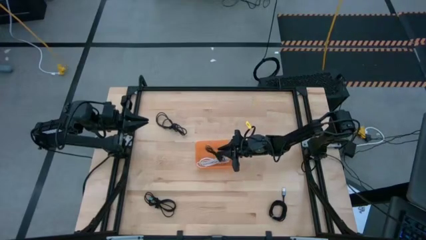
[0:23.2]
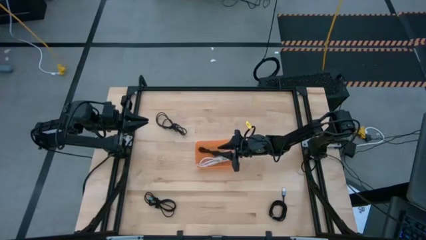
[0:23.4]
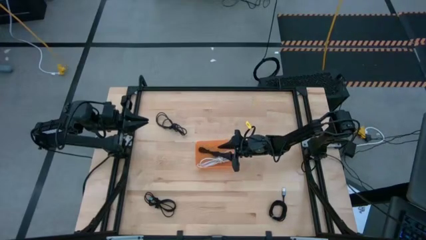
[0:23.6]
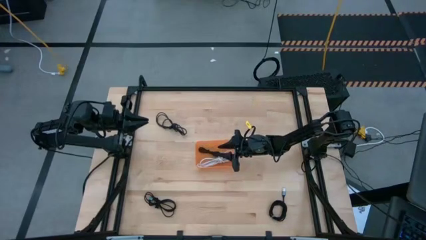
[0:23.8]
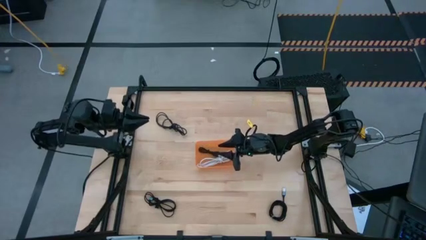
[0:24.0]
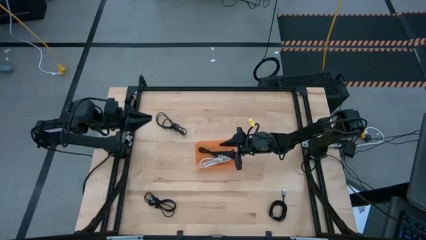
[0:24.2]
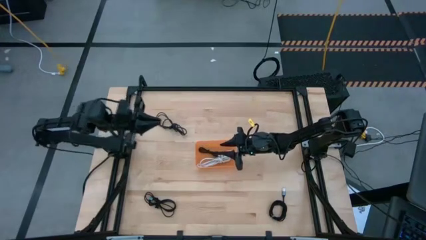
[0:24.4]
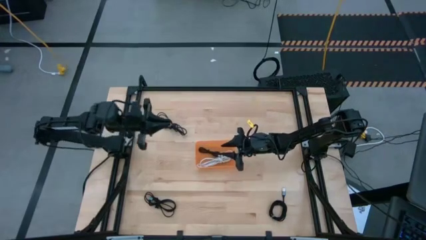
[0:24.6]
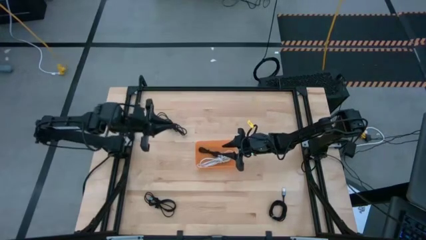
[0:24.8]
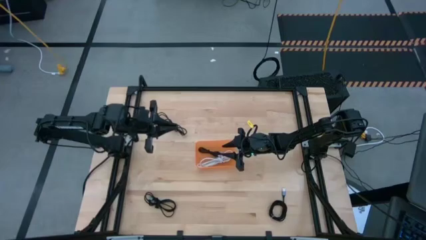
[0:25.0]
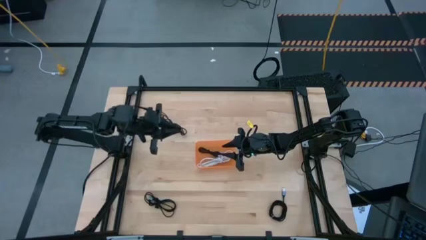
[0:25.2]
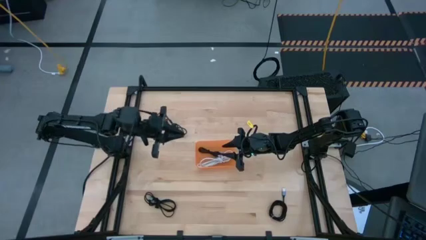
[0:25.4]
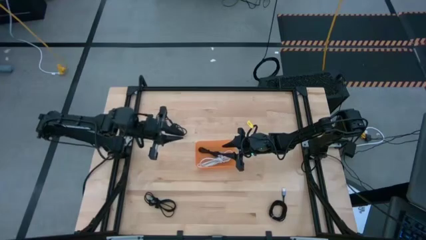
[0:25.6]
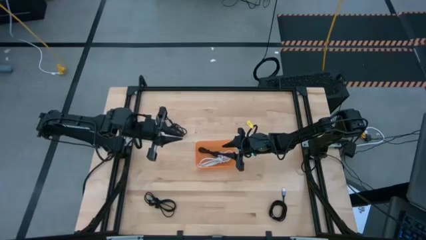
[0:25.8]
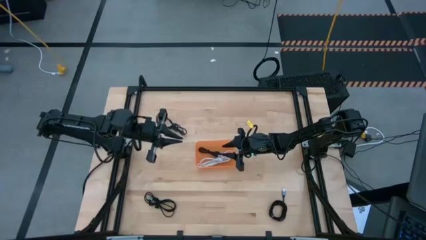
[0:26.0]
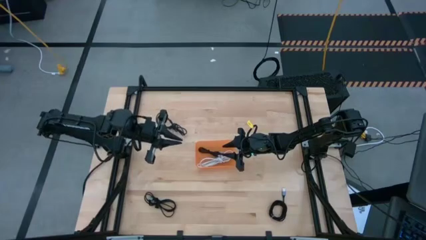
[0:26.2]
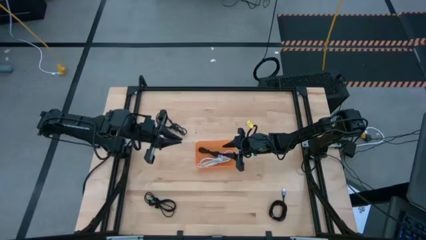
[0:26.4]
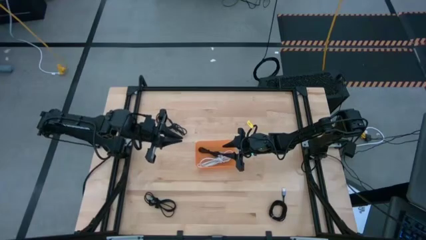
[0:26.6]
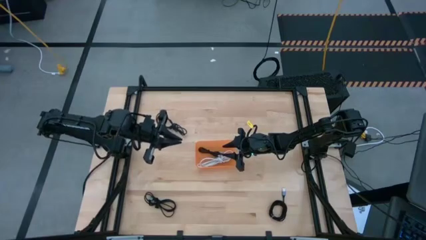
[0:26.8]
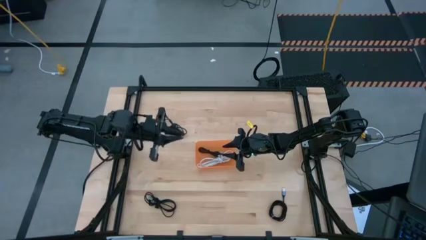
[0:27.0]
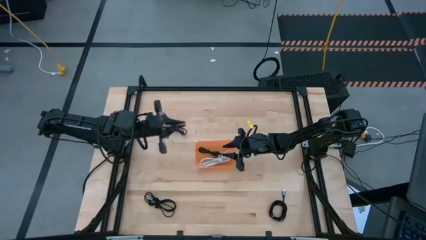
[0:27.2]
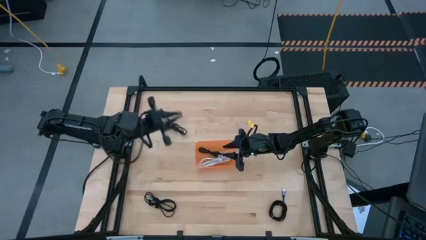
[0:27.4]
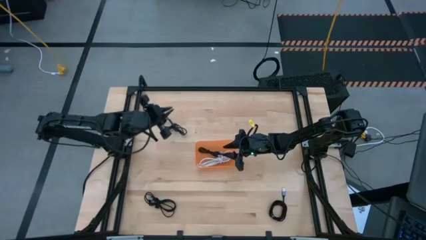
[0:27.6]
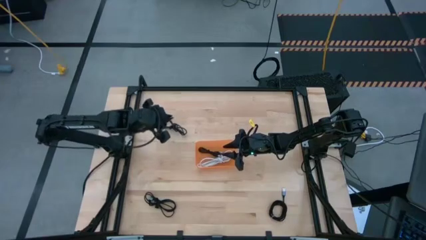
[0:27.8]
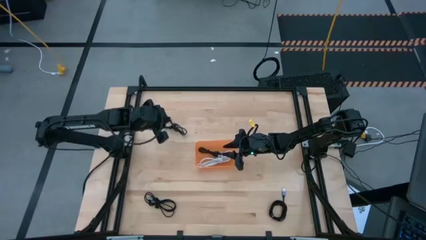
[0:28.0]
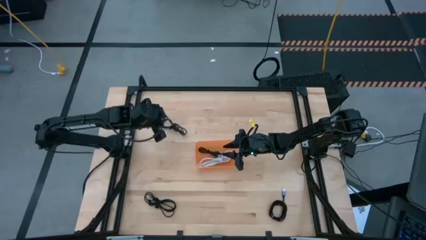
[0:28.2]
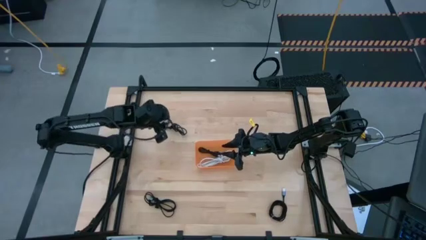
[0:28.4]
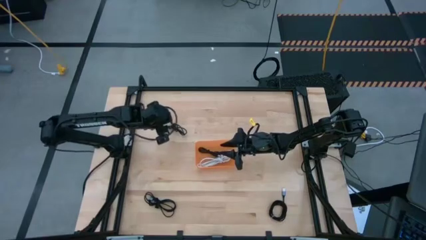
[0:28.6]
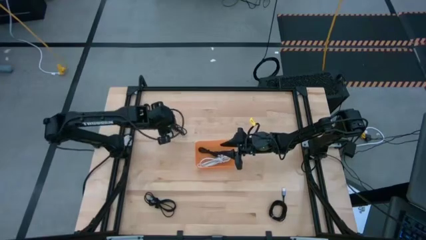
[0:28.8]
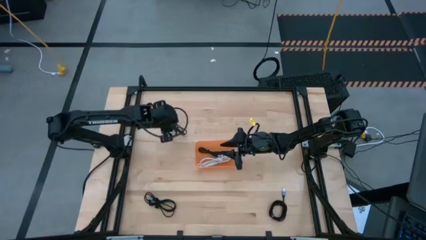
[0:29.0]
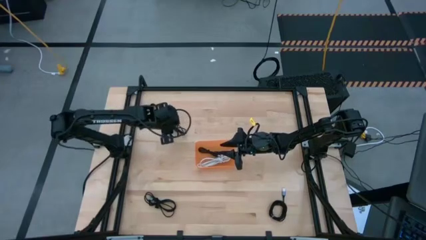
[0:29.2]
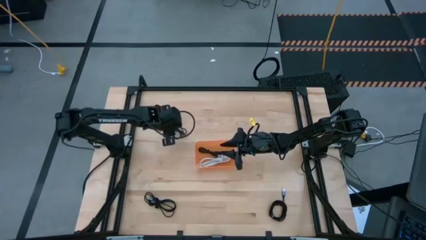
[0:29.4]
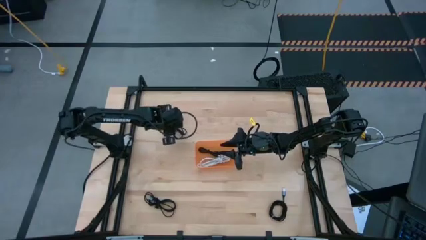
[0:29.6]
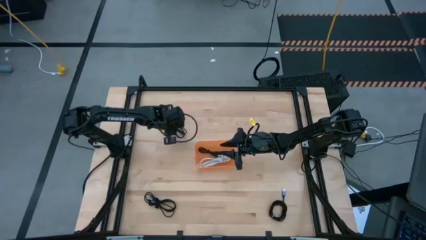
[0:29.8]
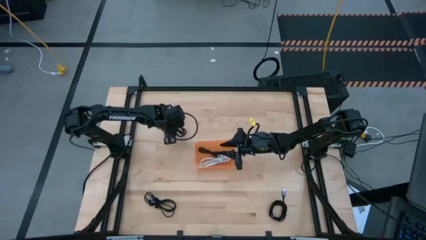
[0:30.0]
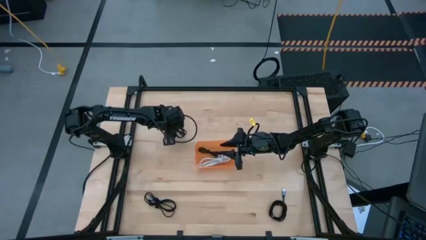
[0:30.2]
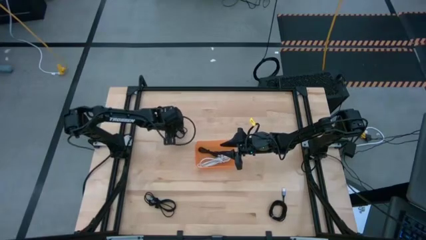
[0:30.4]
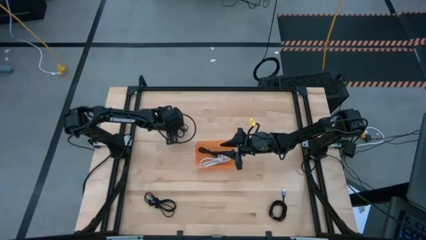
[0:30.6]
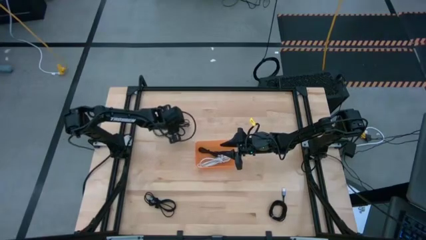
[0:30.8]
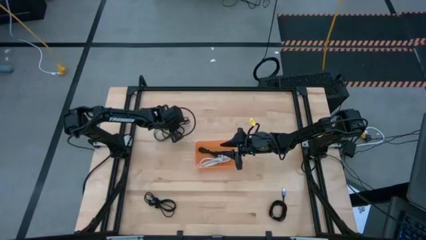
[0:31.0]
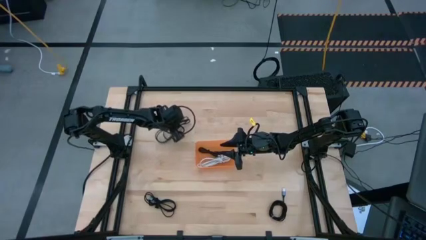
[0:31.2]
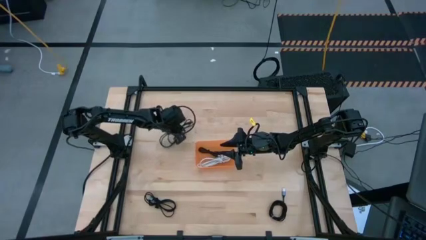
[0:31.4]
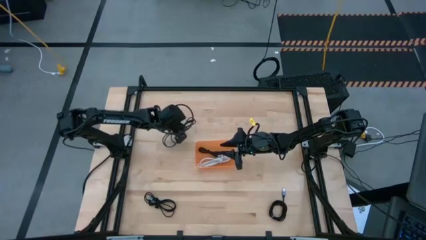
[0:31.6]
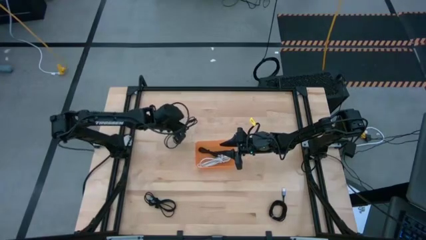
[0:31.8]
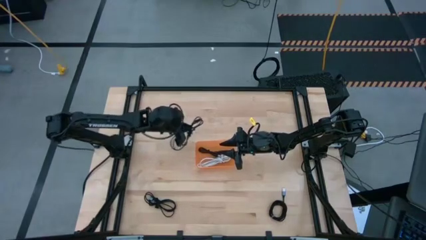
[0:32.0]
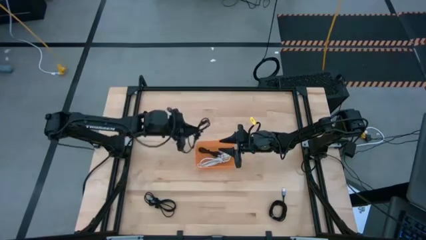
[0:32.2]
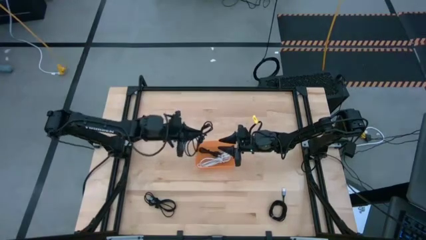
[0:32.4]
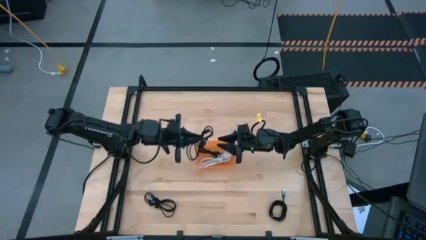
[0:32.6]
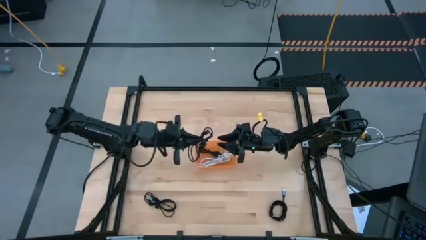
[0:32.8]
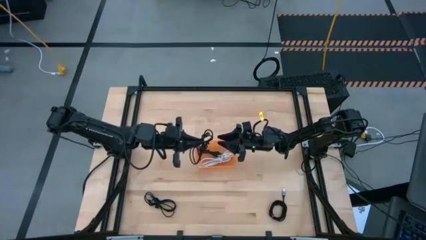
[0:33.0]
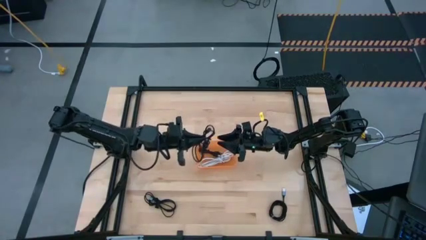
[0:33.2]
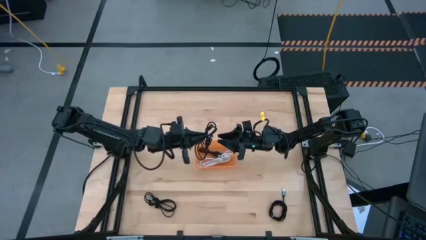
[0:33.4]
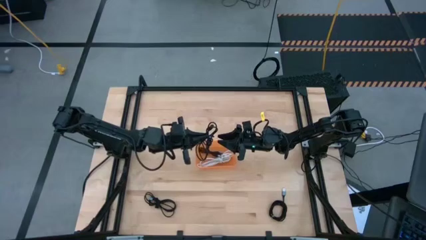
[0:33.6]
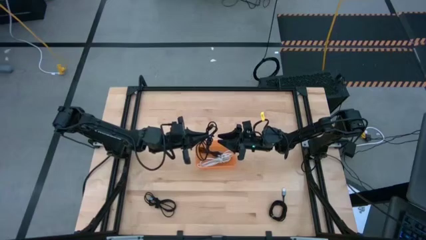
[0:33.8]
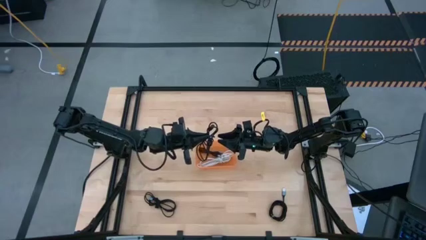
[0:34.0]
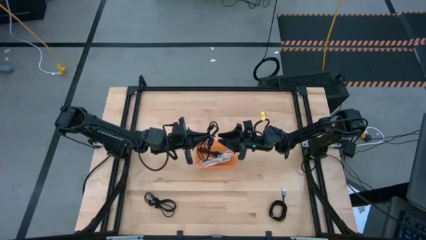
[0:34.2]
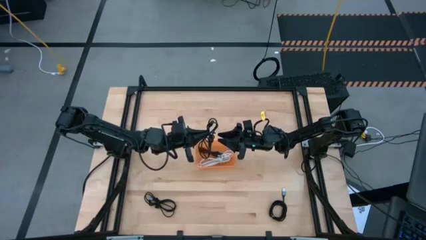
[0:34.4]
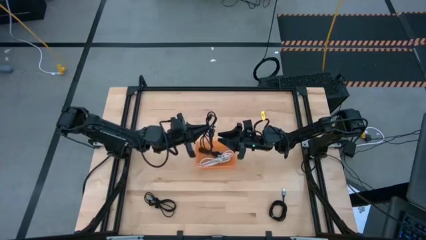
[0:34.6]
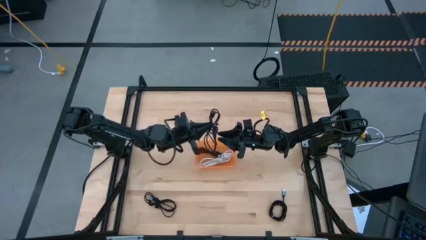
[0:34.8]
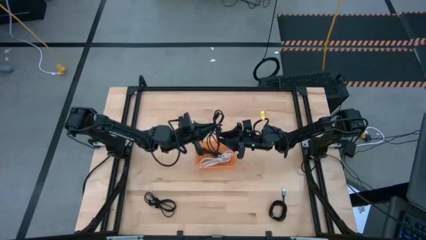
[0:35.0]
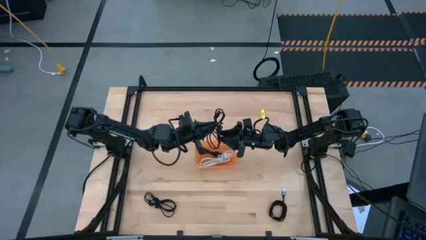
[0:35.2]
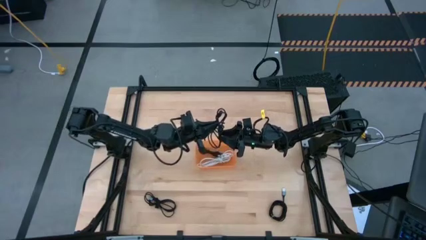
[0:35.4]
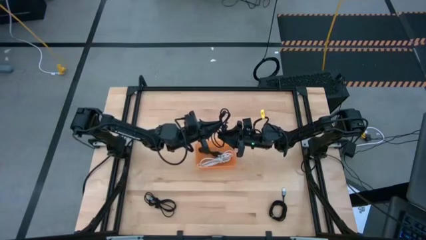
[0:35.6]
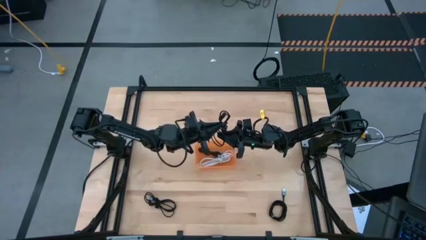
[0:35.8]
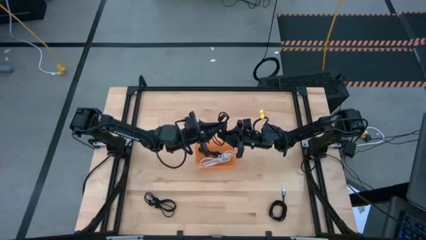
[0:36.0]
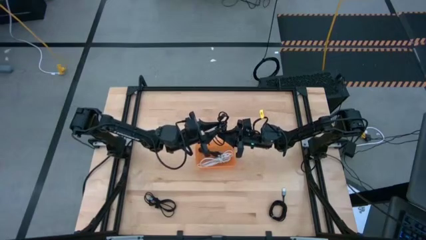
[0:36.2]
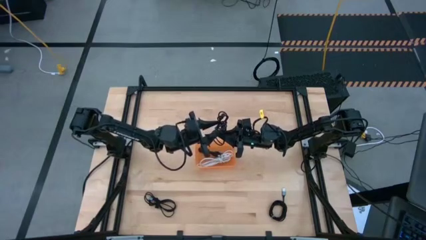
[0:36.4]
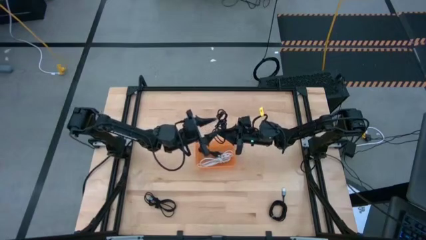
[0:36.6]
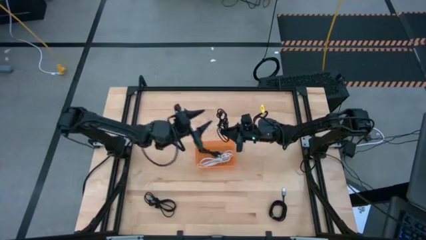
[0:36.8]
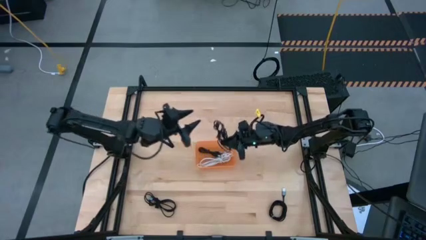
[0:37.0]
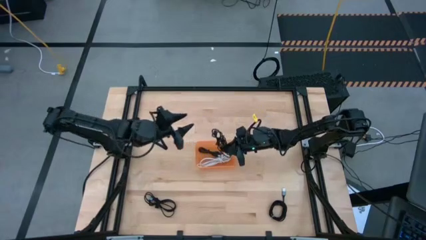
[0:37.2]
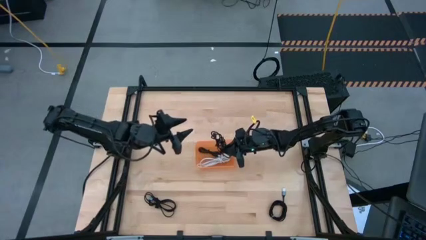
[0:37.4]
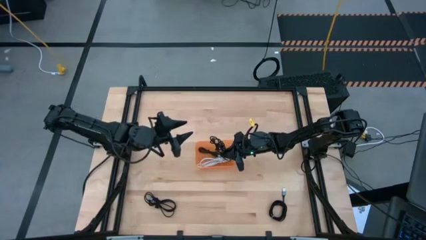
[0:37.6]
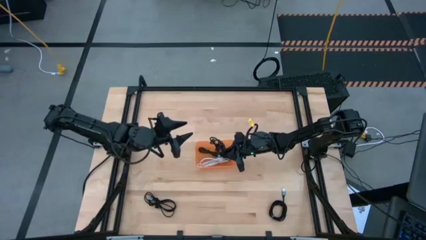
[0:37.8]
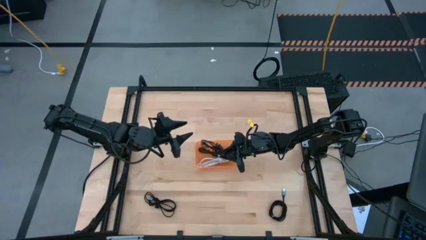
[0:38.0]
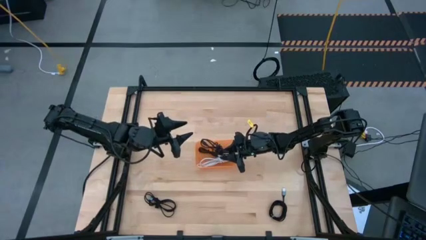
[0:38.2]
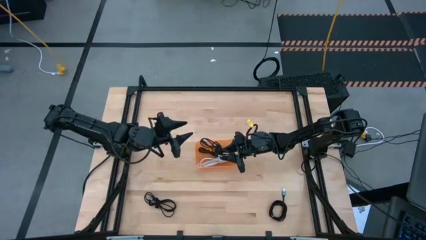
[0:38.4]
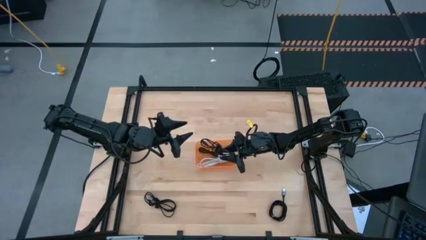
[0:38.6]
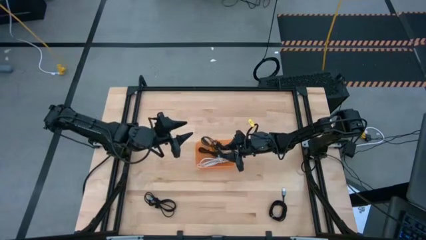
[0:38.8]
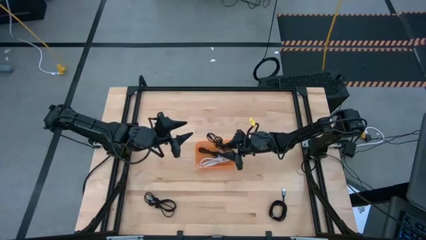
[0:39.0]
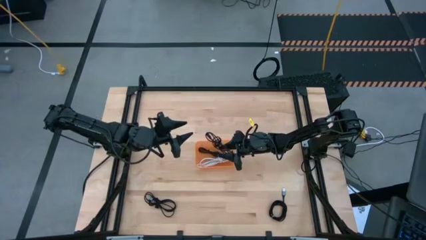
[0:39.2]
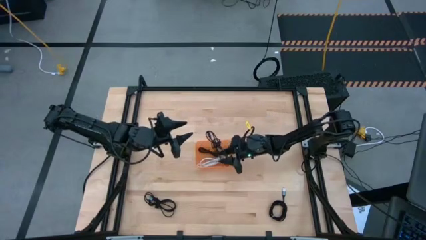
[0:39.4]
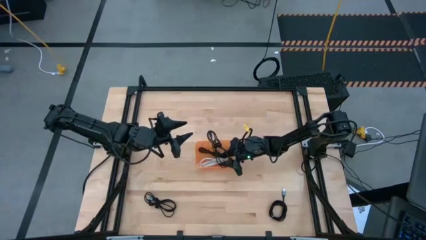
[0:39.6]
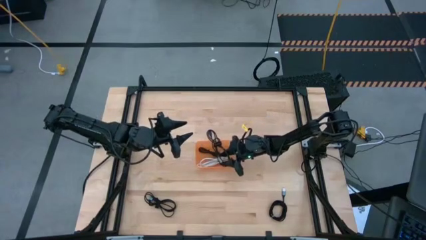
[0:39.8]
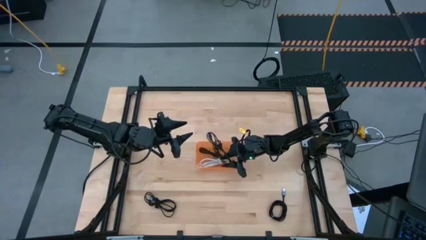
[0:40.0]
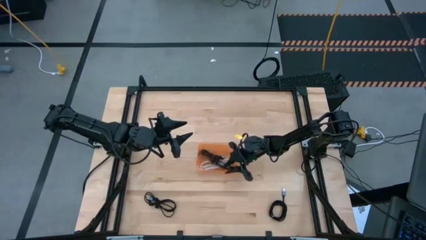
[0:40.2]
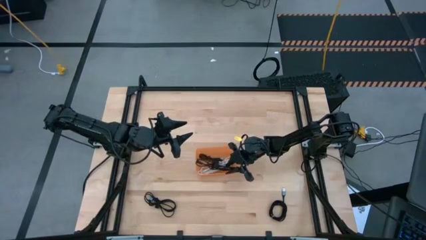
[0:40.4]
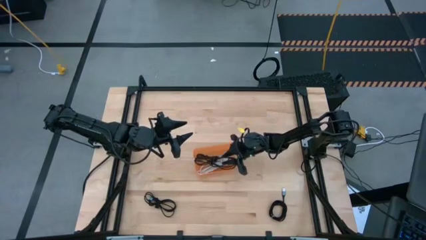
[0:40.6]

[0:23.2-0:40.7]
Task: Pick and place USB-C Cables
Put the black charger cable into the orange bin
